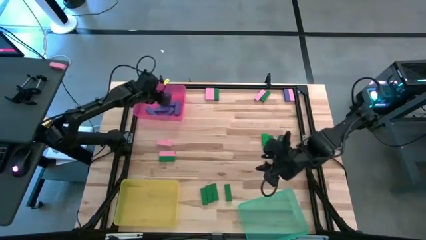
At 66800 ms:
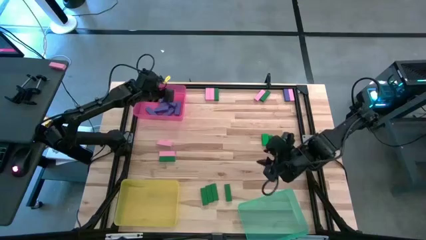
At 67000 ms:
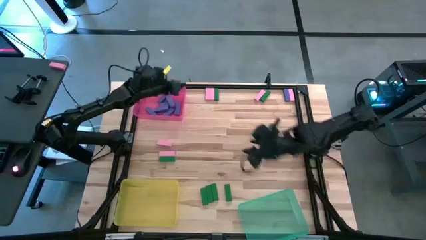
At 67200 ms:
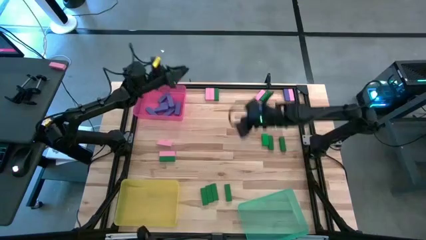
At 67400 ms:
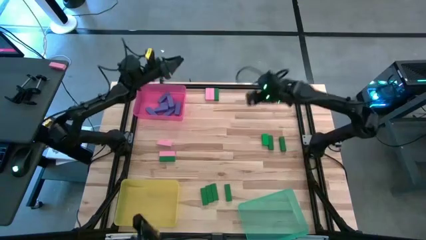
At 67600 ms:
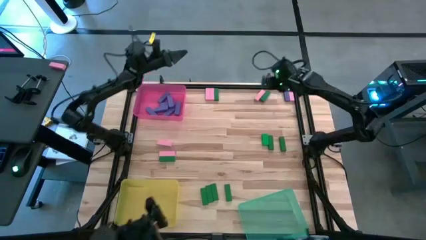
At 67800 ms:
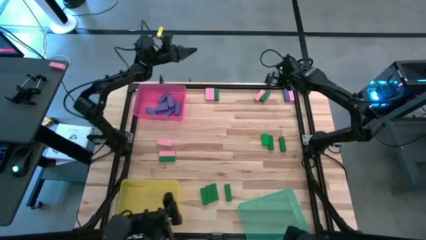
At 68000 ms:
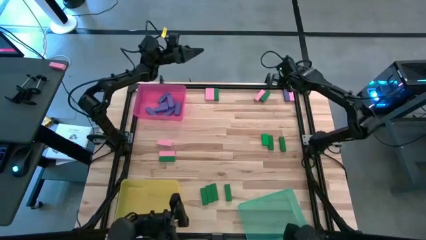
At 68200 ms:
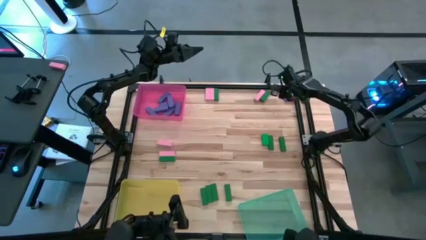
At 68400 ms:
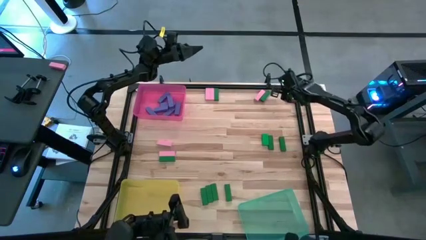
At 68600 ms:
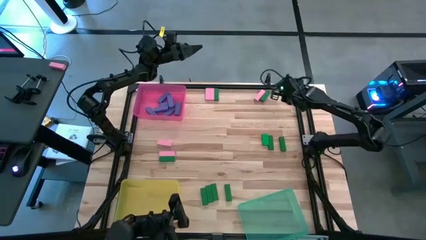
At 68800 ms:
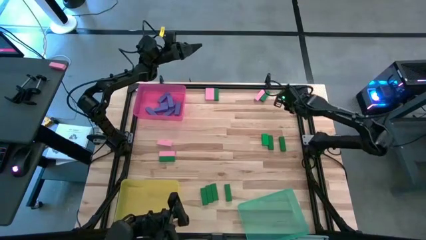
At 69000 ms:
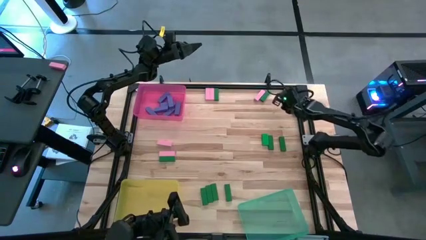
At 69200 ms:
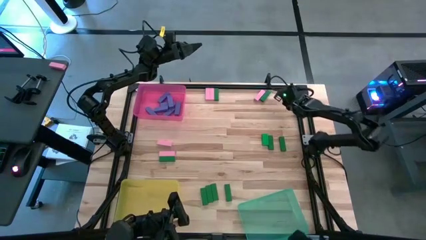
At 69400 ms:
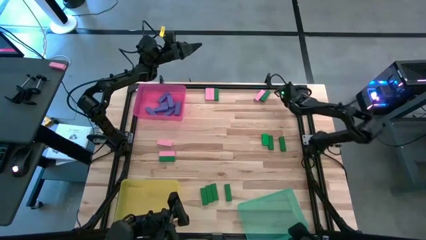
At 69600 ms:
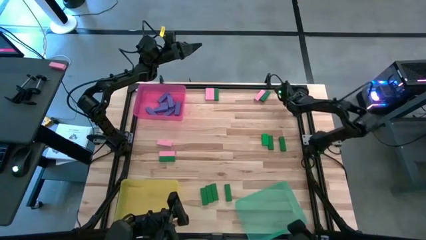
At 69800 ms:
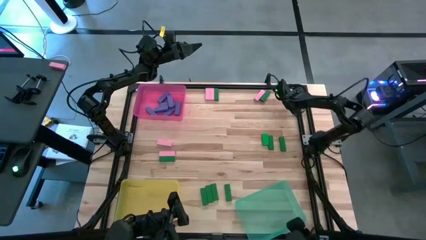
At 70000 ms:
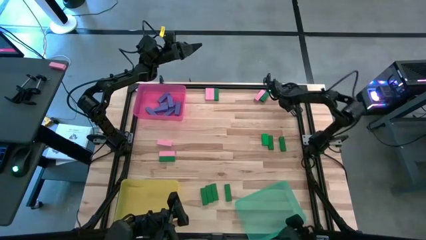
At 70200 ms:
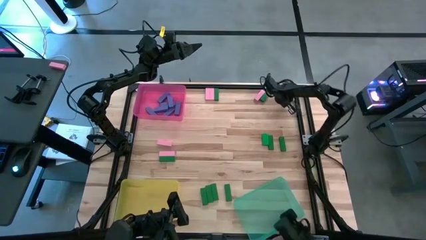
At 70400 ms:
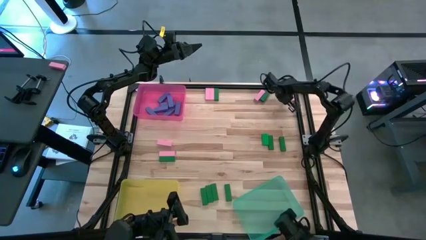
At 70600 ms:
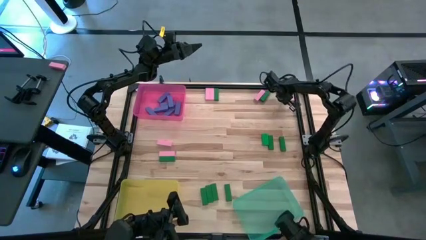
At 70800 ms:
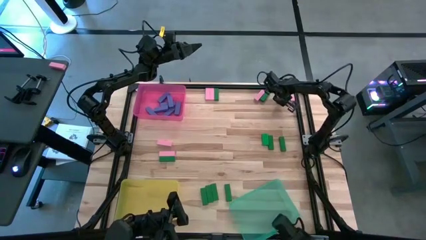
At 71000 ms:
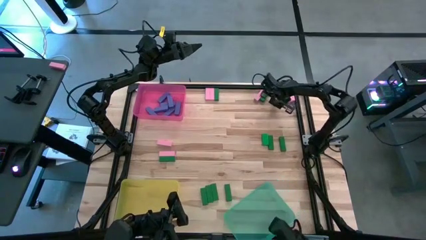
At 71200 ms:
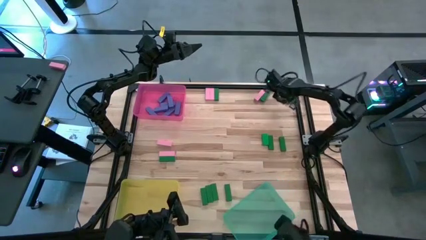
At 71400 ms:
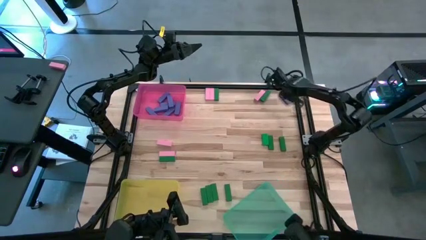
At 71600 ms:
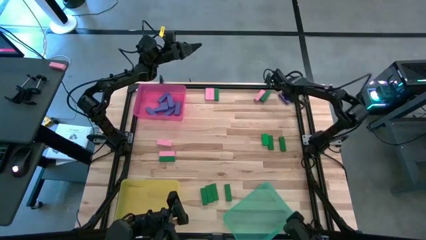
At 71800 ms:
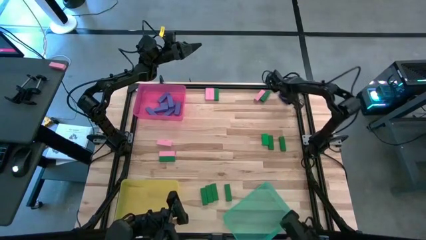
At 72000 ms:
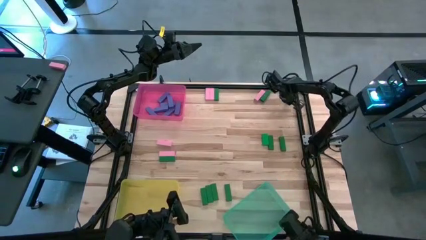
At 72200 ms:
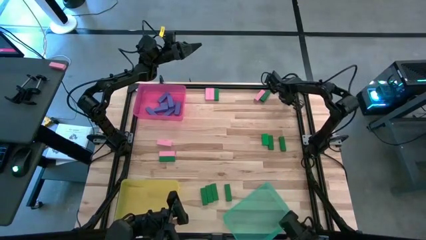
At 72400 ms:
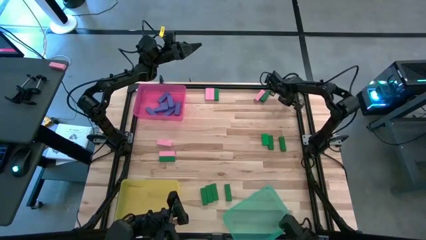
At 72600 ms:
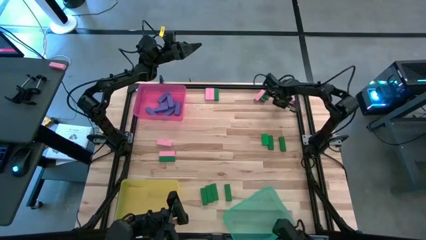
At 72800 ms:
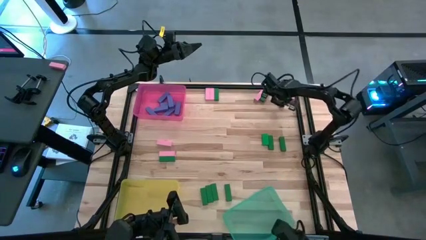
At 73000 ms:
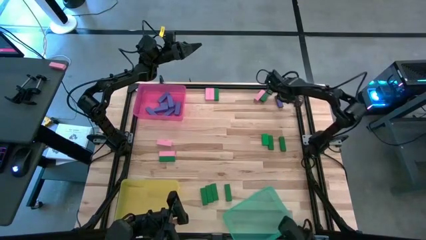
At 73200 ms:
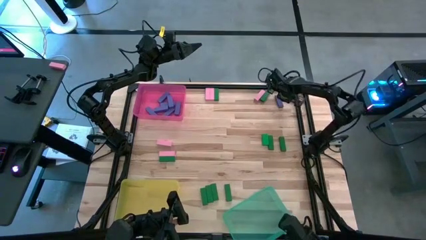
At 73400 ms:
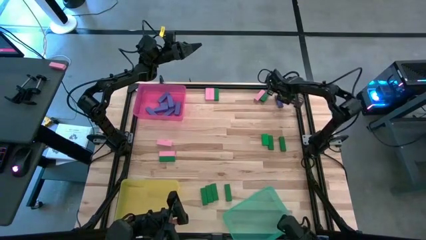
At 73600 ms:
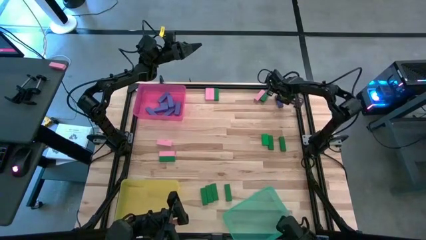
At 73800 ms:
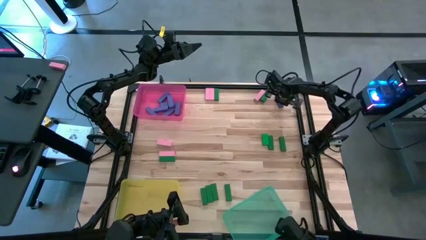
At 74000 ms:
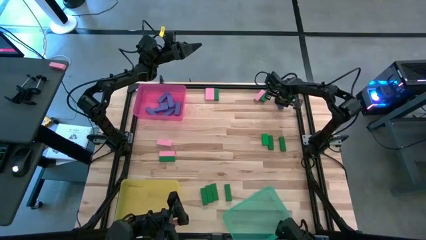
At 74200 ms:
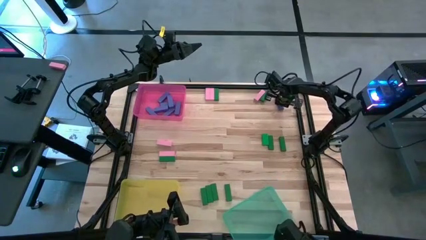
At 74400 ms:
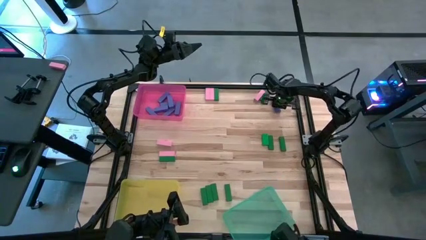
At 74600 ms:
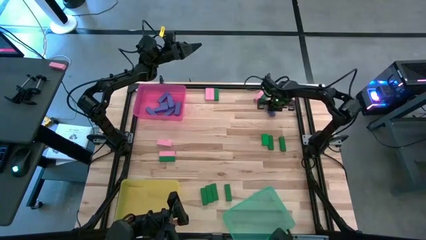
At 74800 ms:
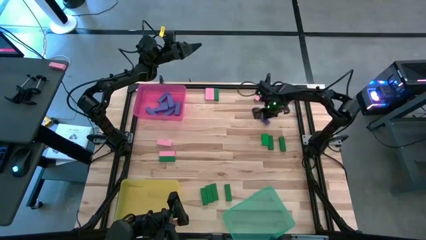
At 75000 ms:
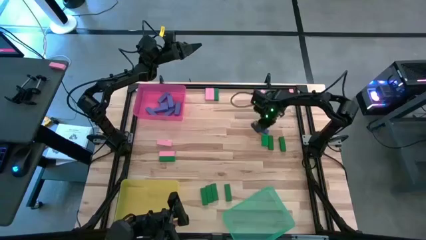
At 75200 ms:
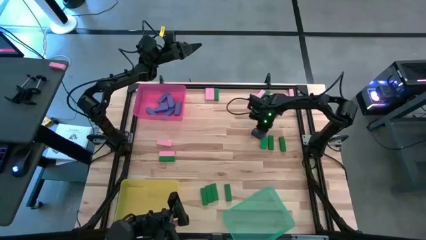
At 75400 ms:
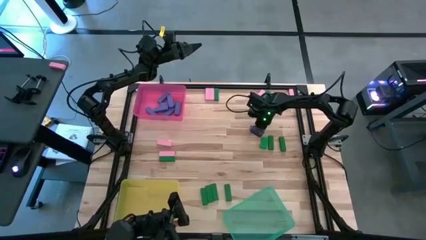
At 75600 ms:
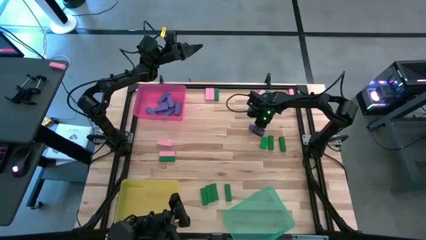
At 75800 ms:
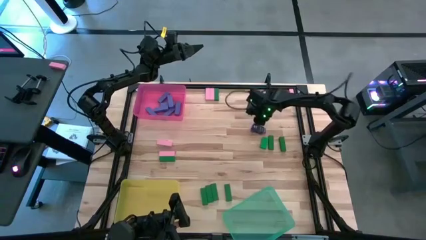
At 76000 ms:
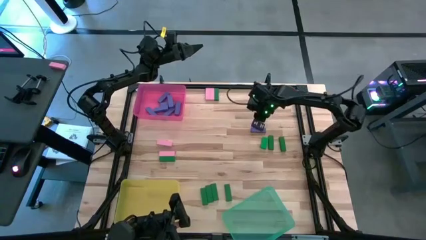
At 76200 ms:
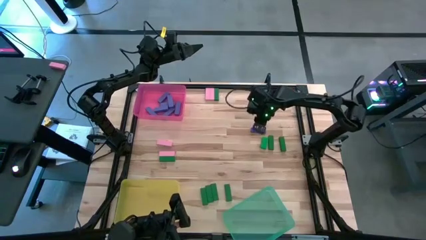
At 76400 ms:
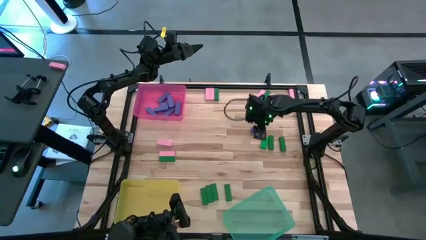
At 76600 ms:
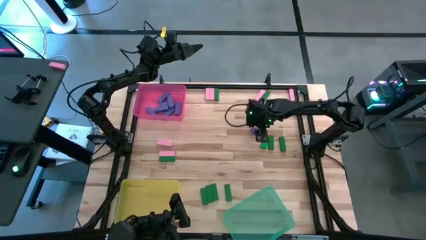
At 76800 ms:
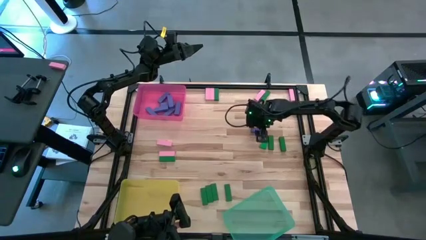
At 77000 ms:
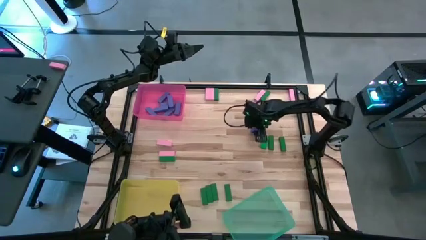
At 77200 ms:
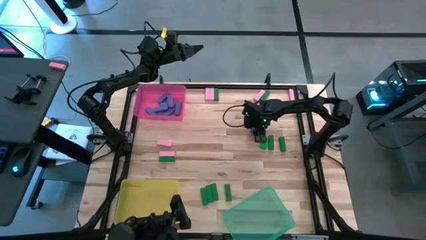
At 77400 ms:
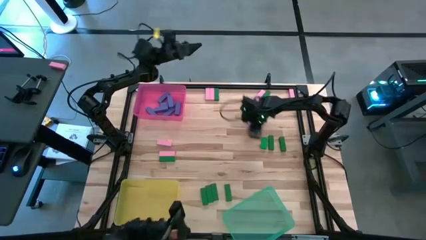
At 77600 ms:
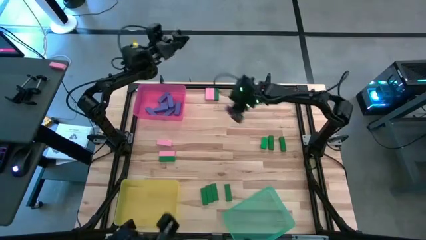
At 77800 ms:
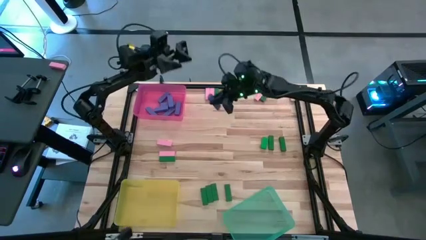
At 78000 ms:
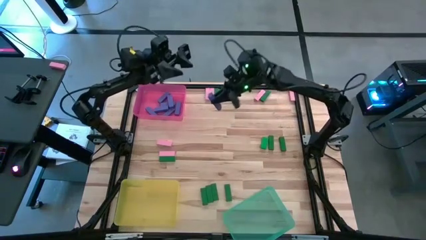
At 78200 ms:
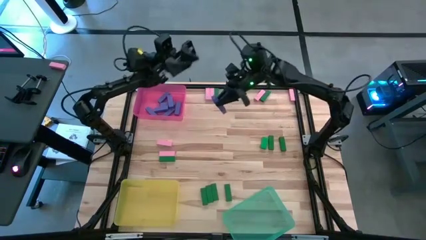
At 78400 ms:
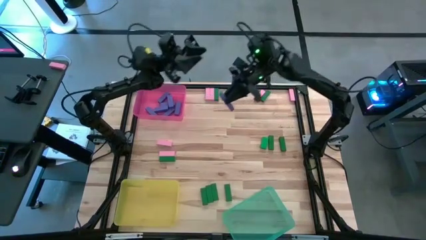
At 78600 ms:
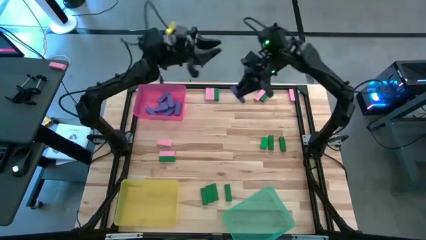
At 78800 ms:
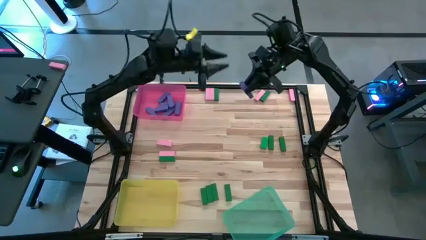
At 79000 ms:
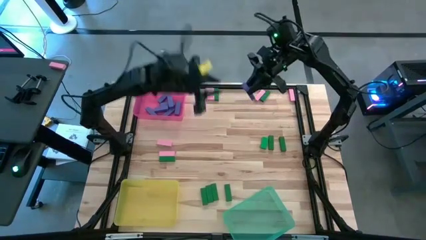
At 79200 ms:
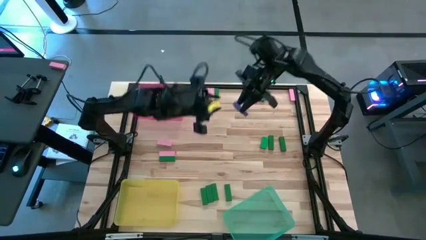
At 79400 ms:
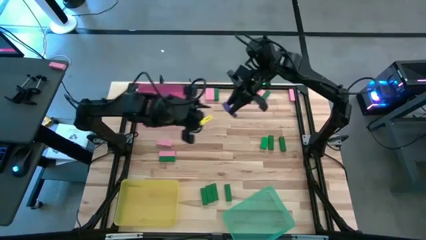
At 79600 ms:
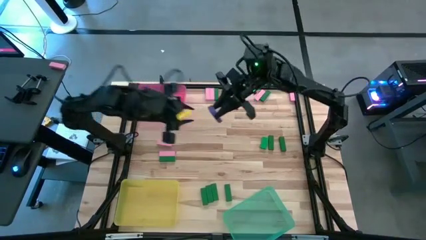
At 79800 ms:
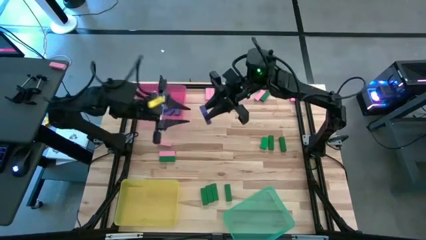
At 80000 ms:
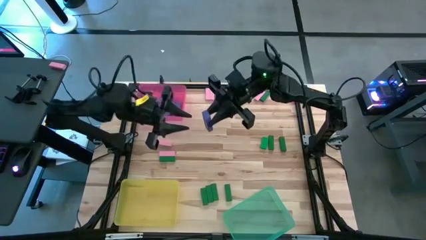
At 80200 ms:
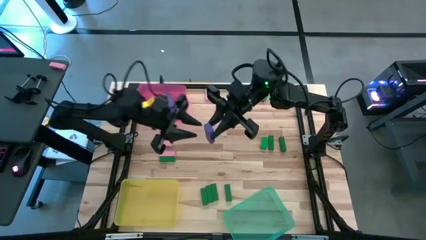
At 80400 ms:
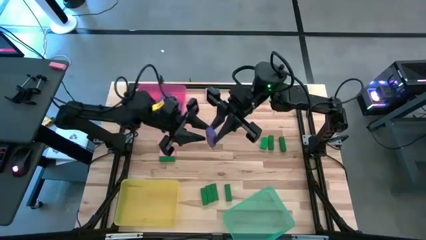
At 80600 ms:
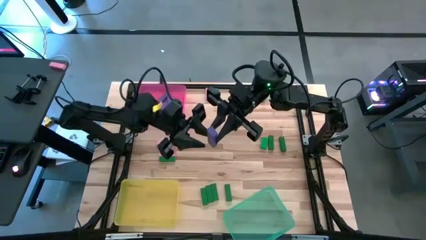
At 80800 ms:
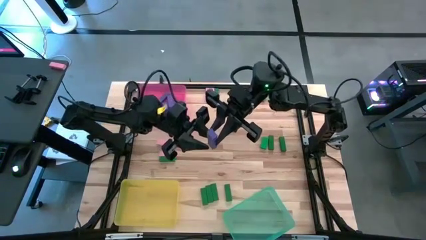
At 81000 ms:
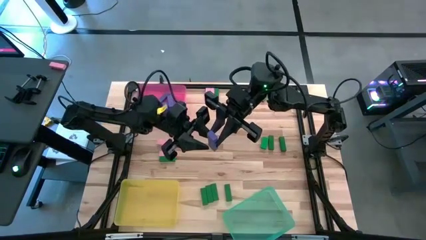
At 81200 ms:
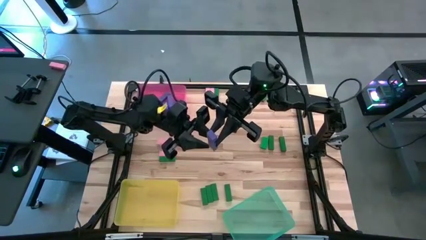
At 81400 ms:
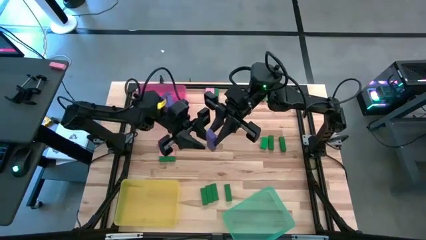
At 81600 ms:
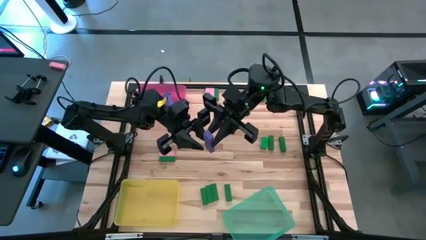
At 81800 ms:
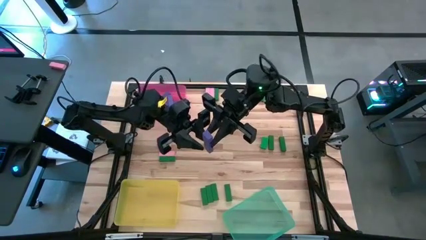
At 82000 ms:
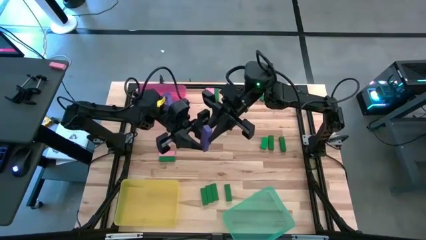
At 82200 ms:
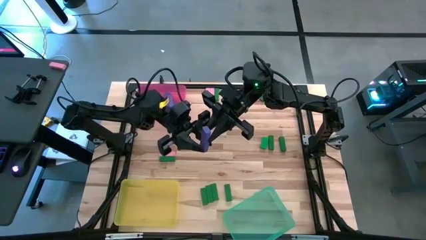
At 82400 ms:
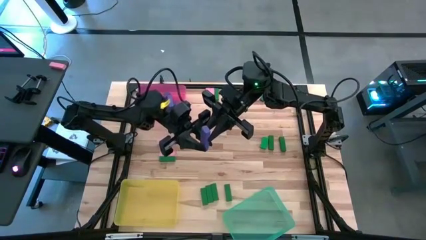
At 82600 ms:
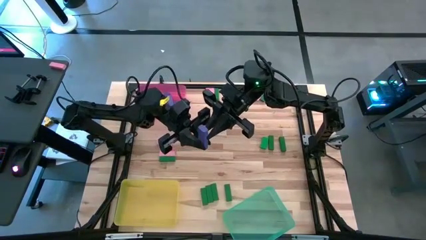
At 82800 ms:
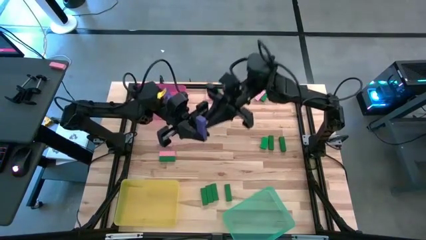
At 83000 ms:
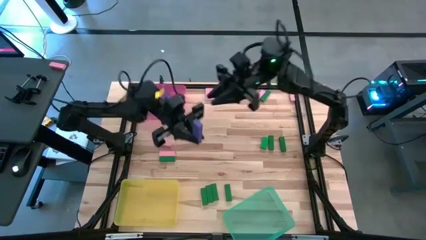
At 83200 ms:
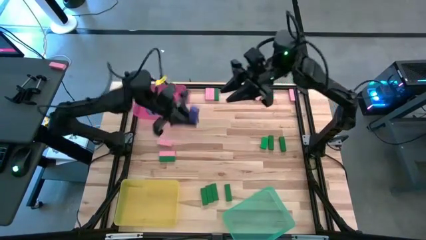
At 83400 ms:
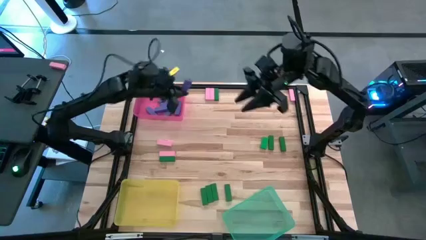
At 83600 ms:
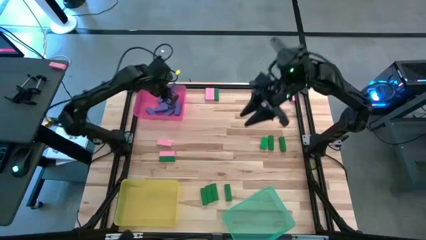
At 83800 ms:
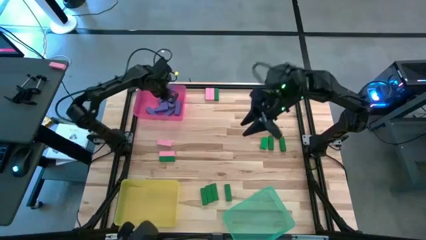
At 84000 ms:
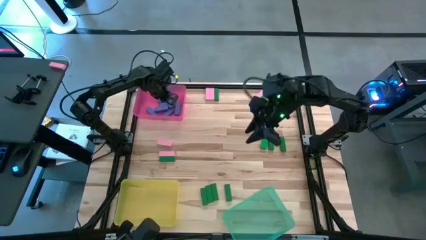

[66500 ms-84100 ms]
Task: Sort blocks
Put the violet block into the pink bin
